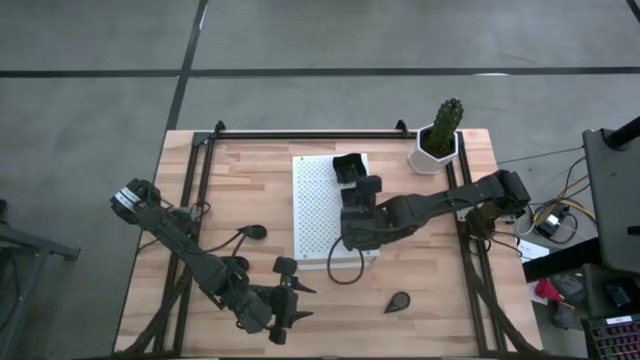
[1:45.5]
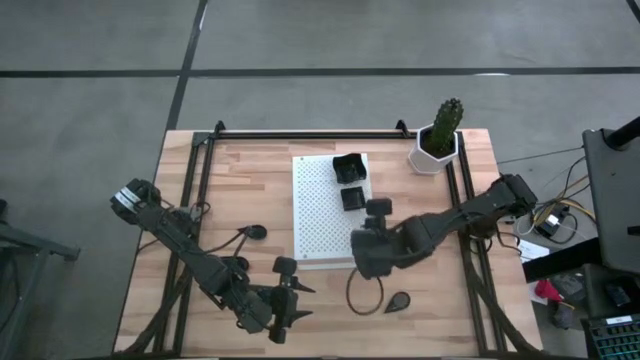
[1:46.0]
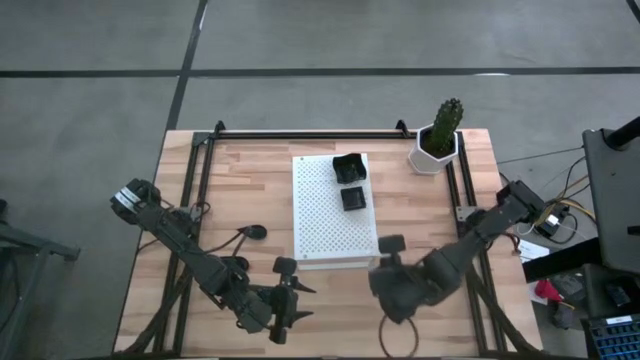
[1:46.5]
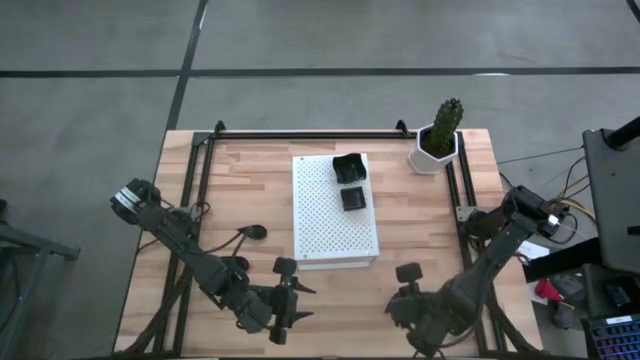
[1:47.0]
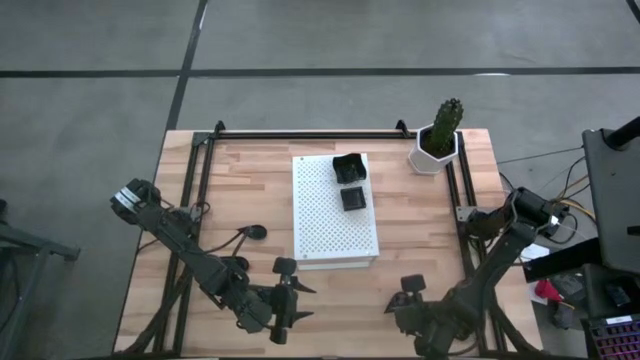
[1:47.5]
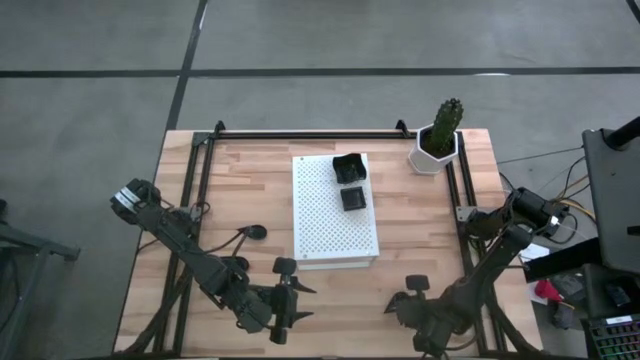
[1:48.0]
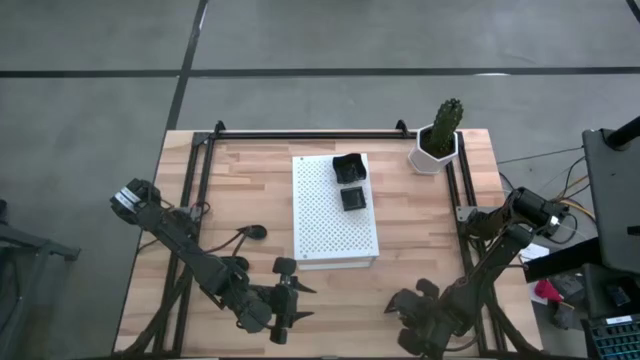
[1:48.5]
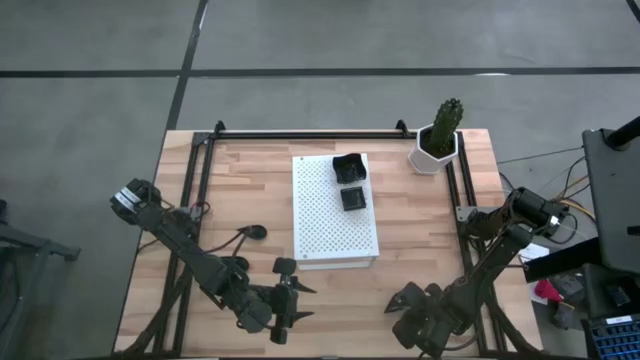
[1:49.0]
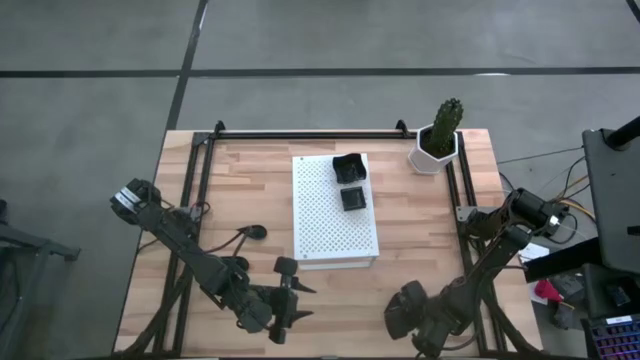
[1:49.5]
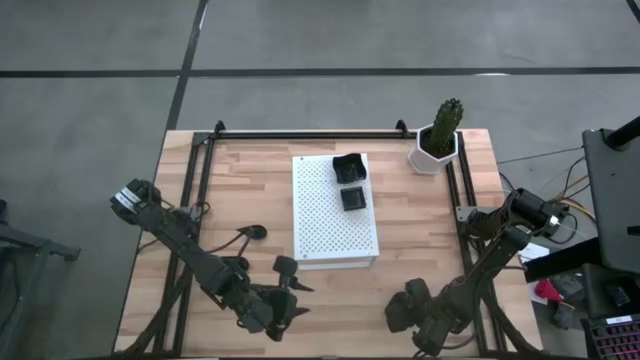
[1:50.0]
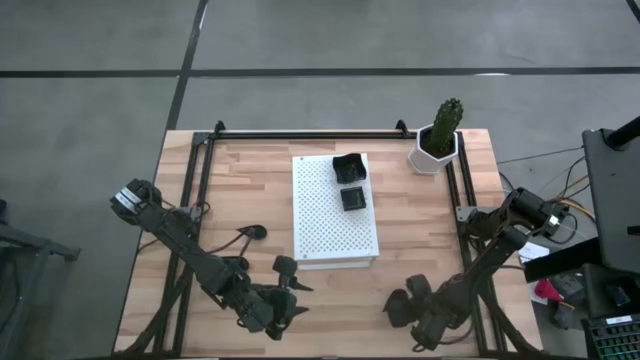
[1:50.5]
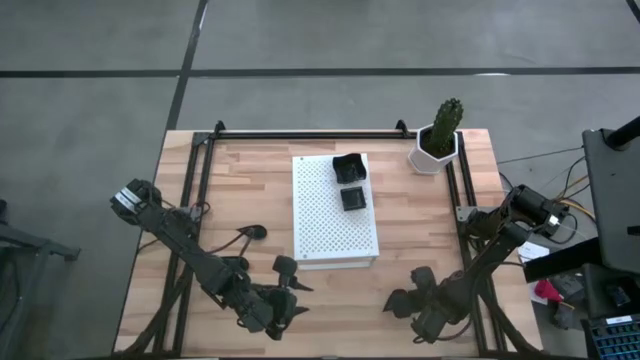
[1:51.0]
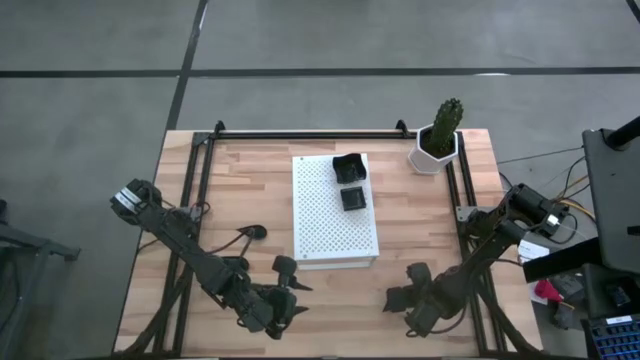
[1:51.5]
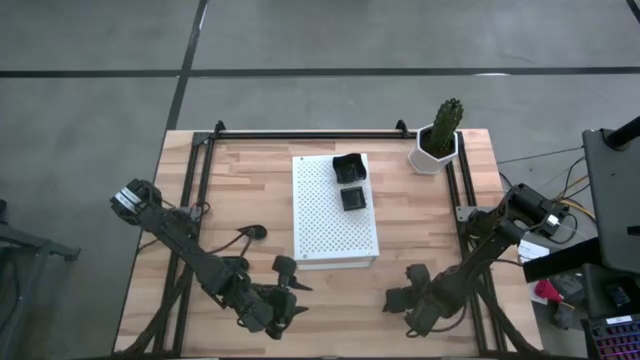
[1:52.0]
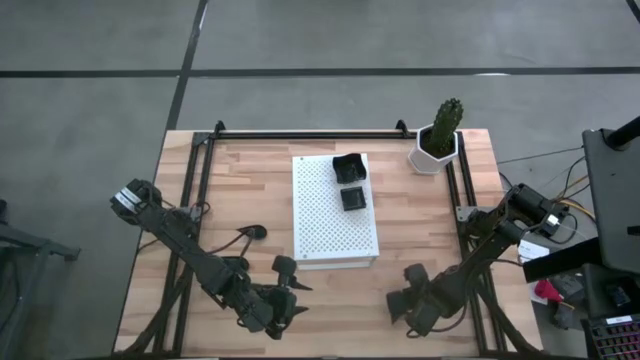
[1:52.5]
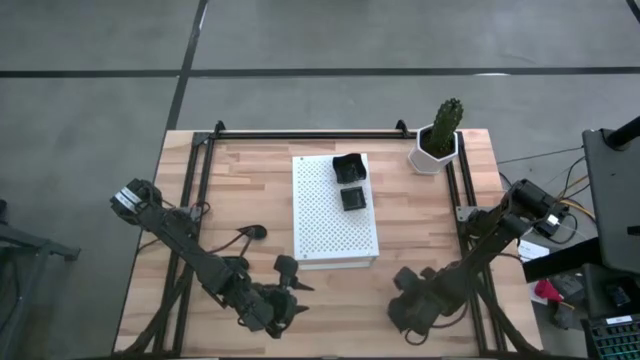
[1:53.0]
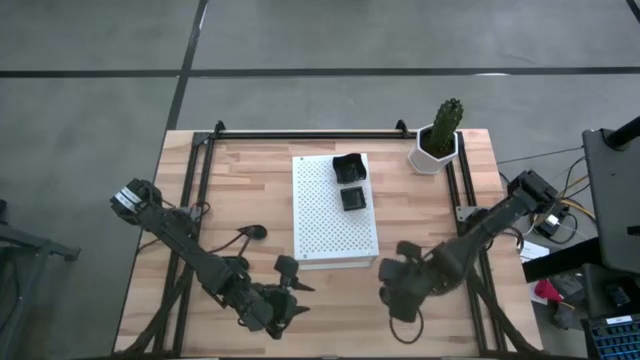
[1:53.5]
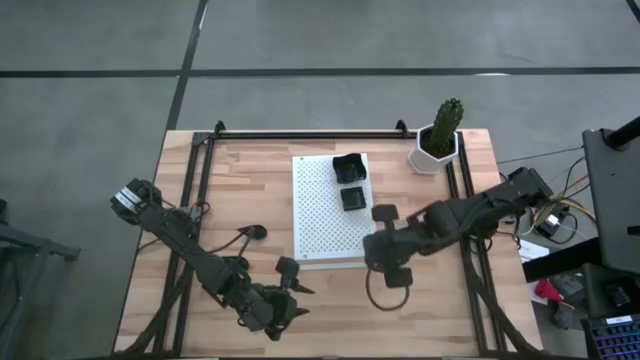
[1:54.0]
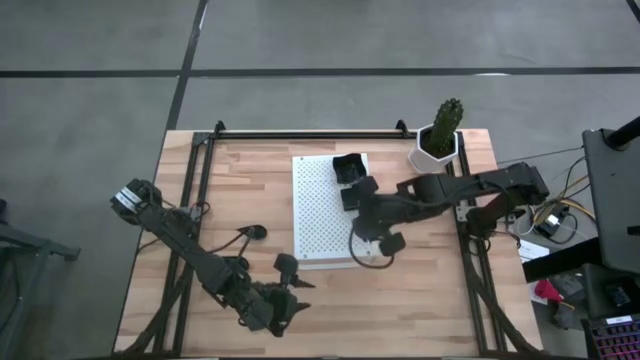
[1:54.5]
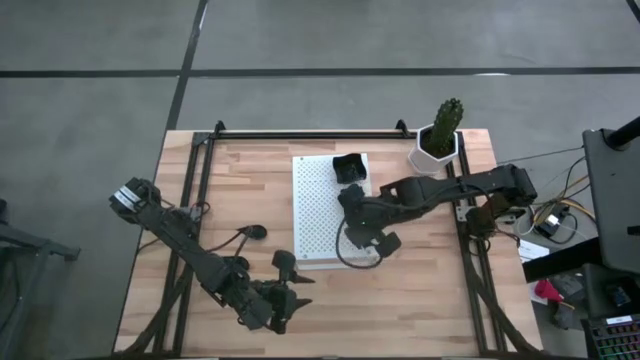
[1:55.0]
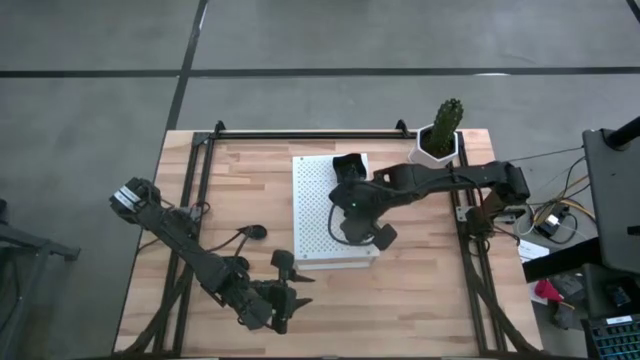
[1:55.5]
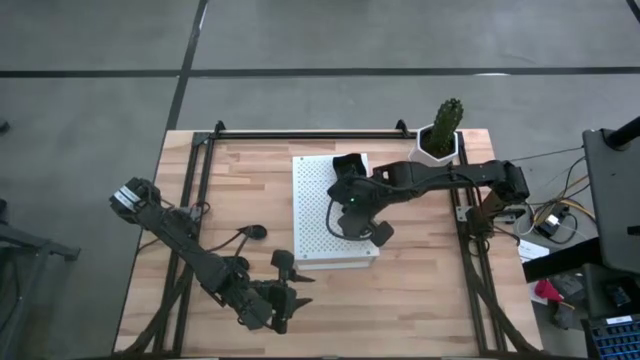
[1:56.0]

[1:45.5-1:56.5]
Task: Pick & Place Mini shaped plates
Put the black drop-shaped plate on the shelf

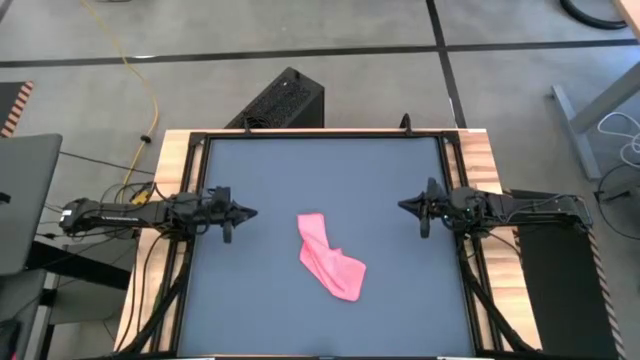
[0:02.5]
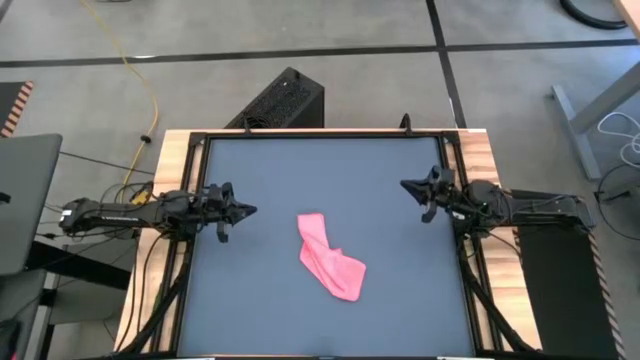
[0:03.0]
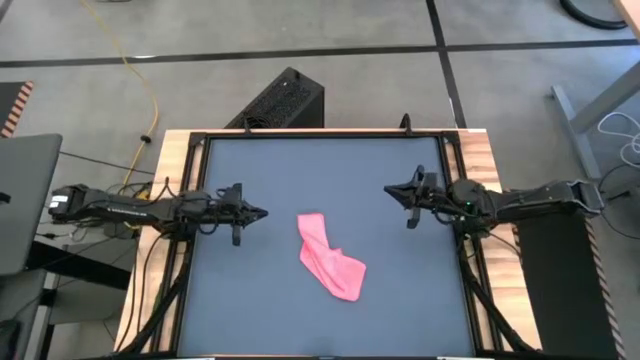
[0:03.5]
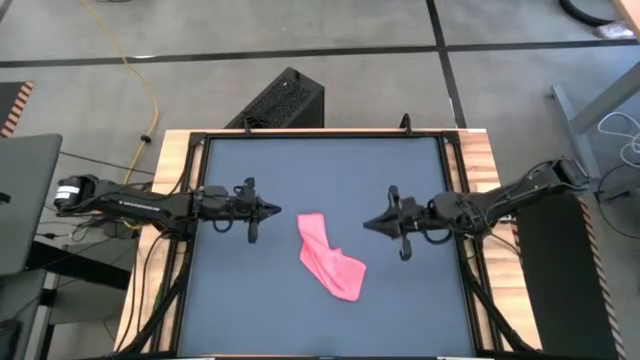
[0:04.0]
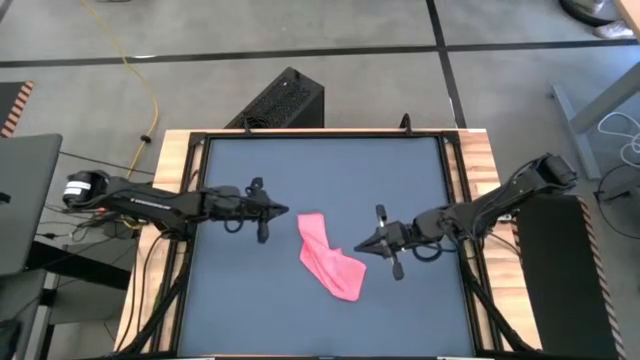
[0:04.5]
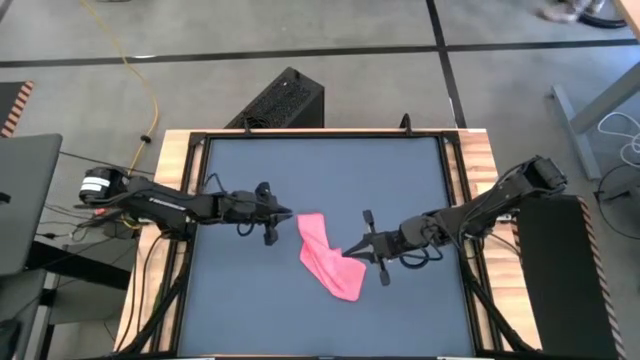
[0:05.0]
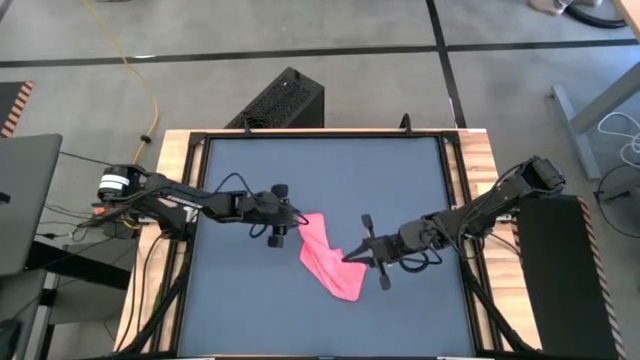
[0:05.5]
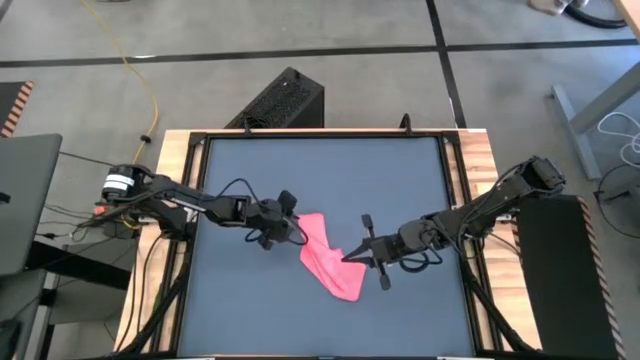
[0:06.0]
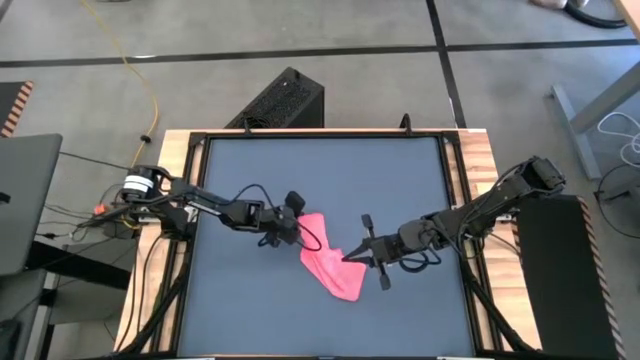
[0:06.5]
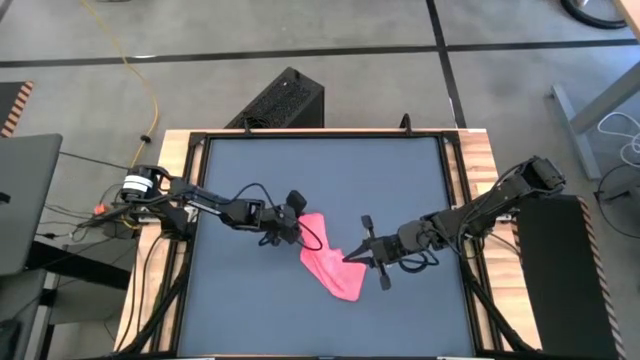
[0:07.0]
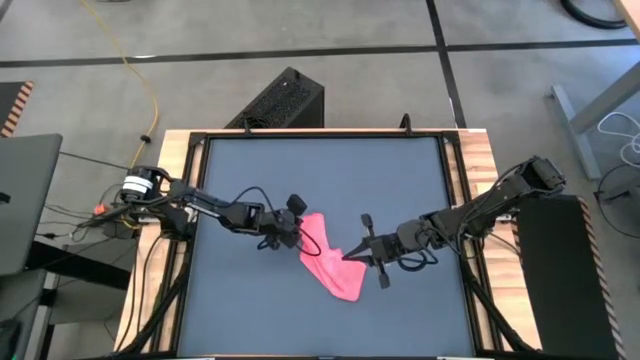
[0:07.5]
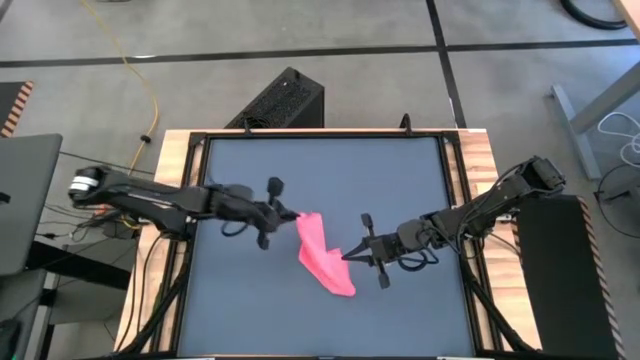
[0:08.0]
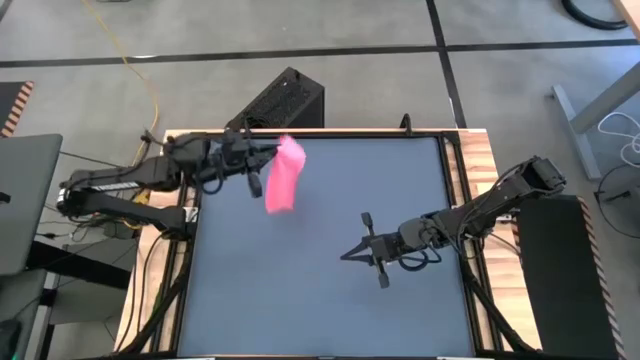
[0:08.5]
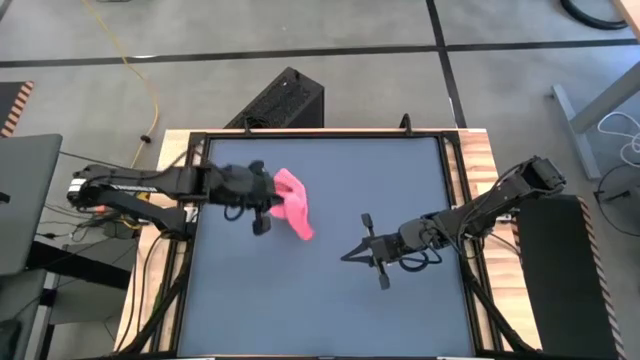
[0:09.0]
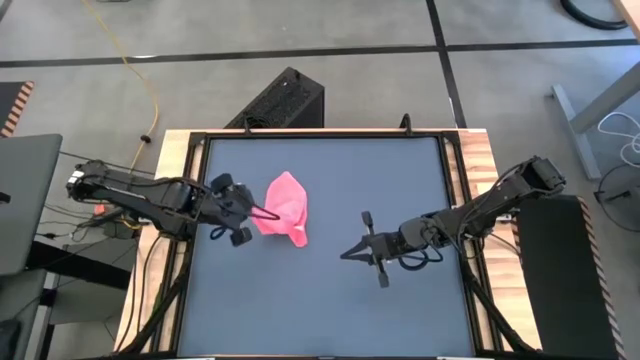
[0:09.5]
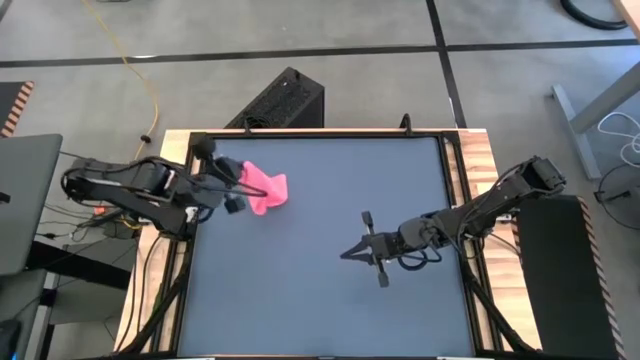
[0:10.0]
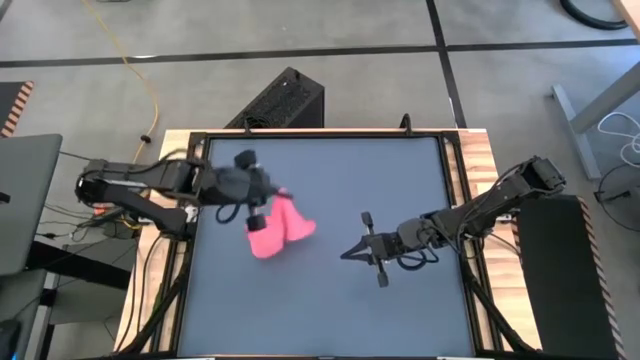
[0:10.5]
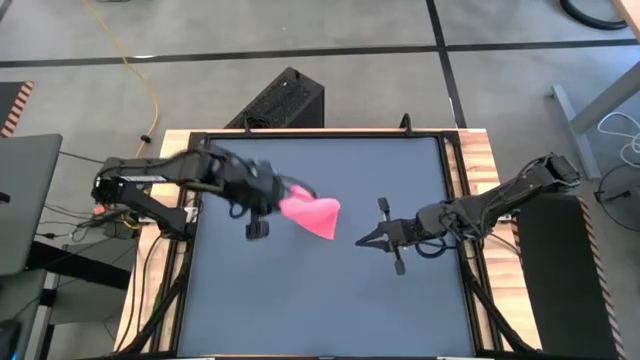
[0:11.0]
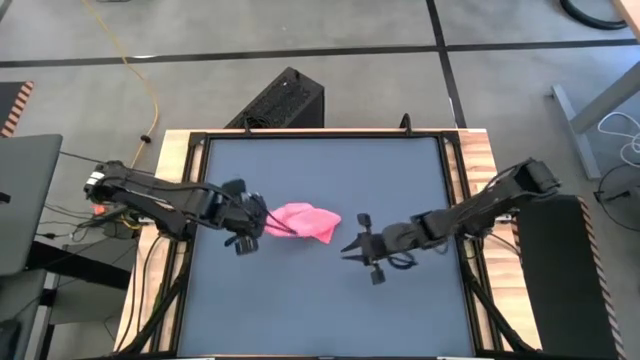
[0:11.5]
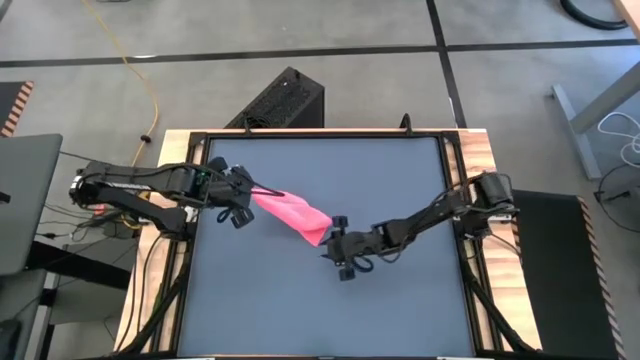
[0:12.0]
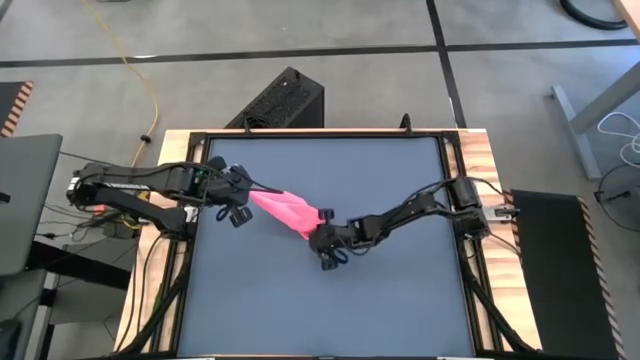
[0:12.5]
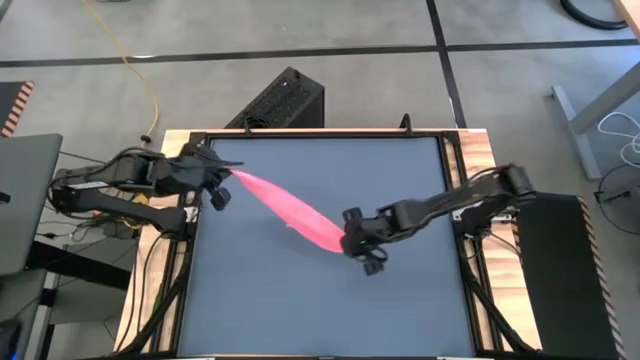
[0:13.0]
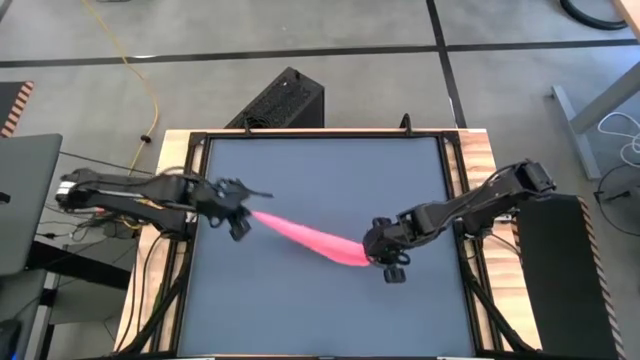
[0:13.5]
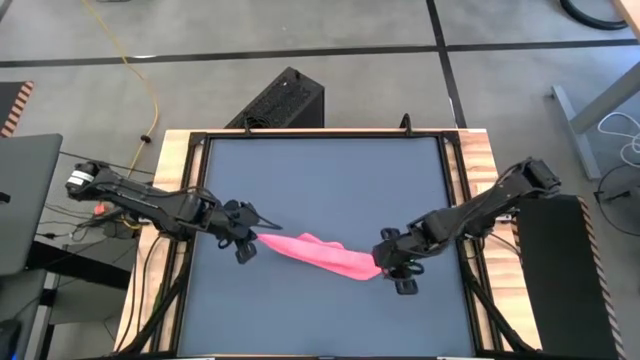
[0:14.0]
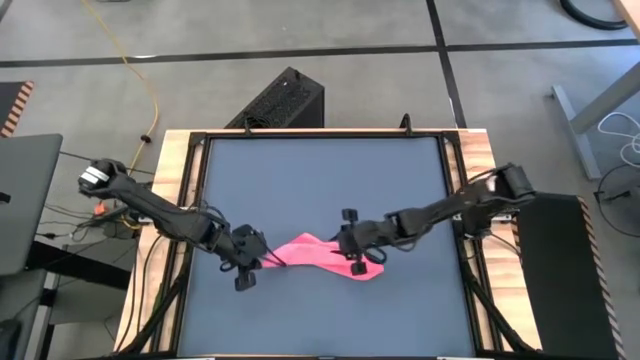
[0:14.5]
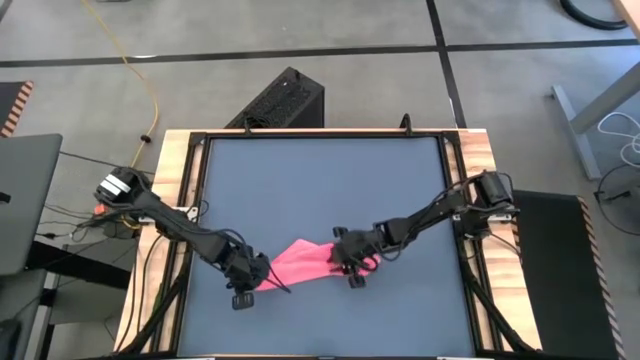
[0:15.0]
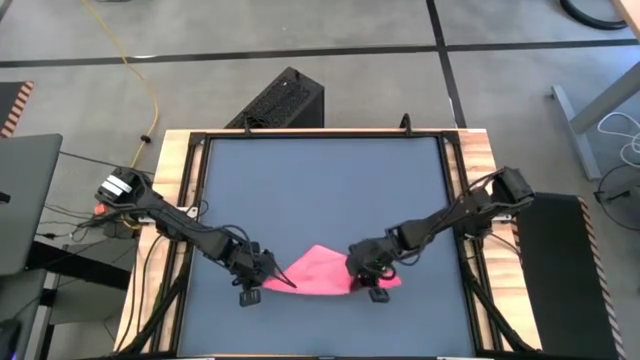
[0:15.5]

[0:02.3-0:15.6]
Task: Roll towel
Fold the pink microfiber towel
